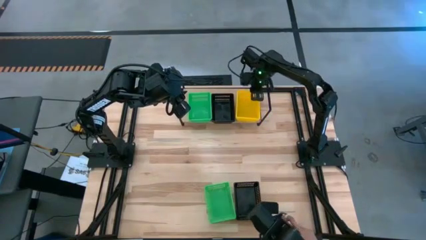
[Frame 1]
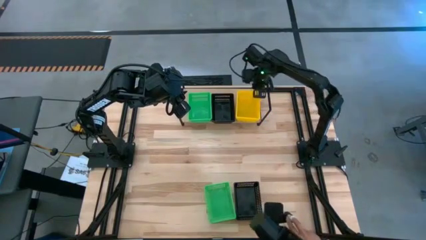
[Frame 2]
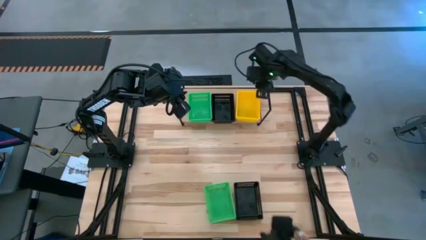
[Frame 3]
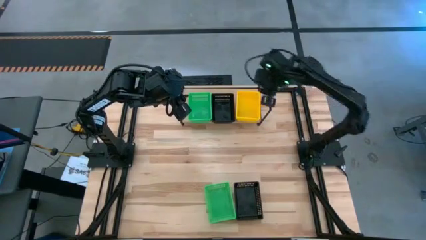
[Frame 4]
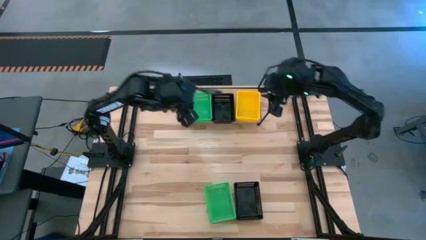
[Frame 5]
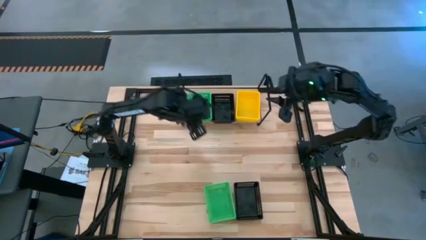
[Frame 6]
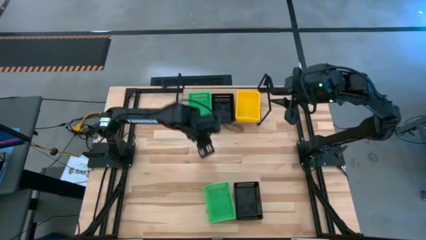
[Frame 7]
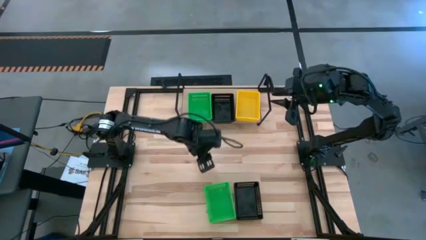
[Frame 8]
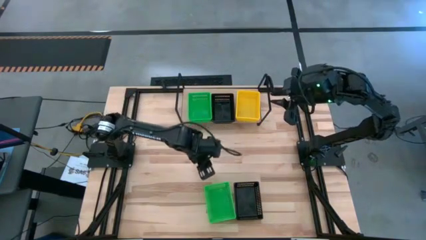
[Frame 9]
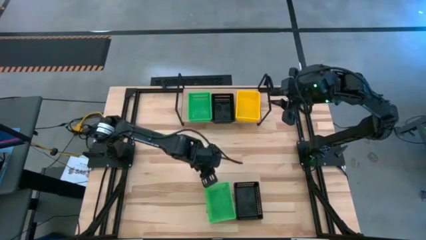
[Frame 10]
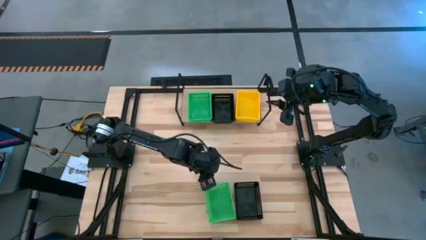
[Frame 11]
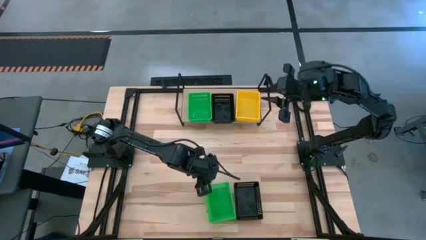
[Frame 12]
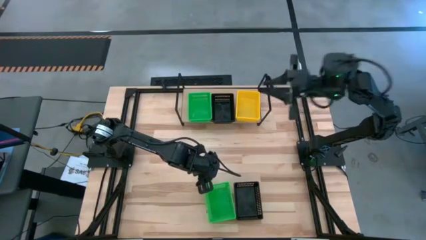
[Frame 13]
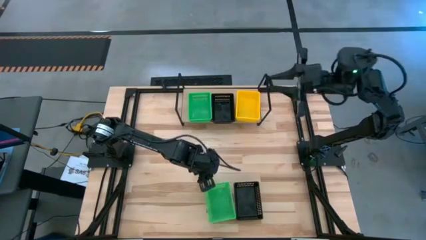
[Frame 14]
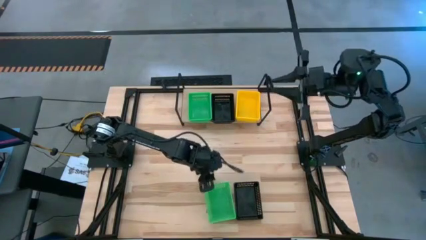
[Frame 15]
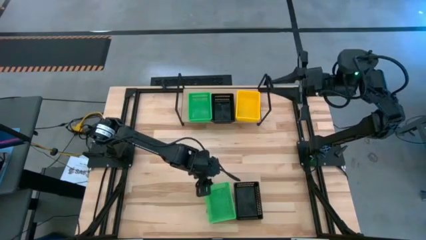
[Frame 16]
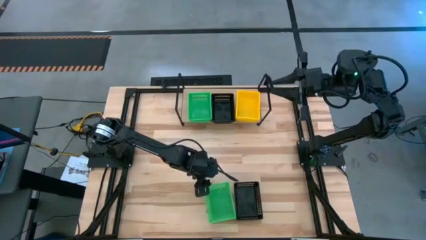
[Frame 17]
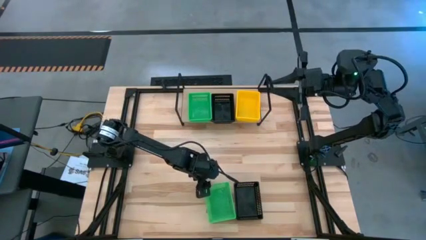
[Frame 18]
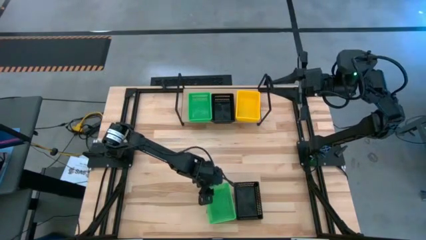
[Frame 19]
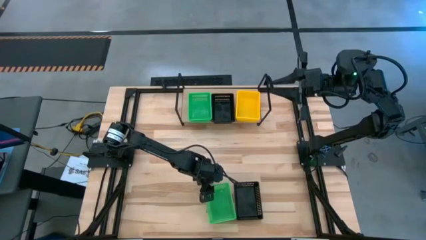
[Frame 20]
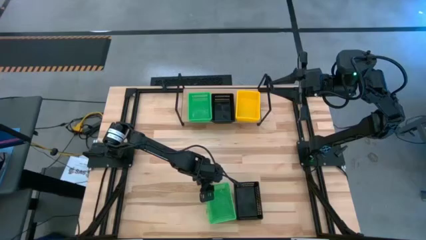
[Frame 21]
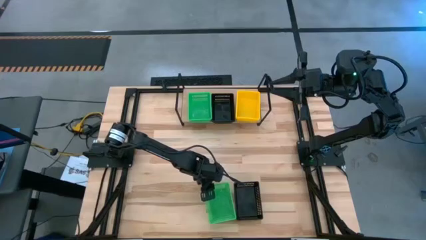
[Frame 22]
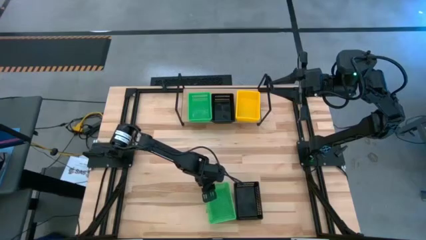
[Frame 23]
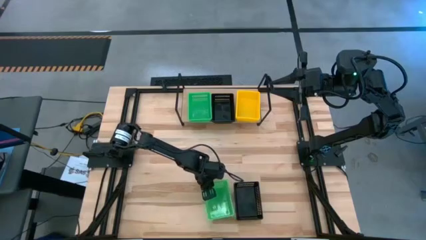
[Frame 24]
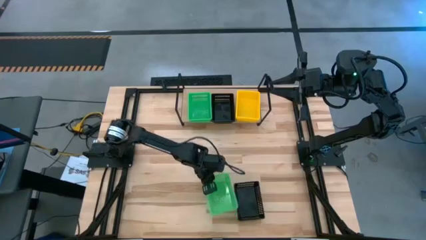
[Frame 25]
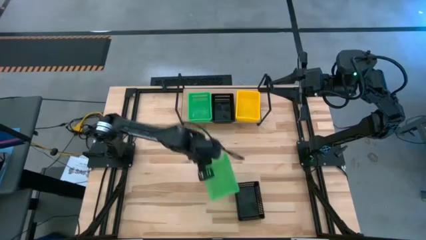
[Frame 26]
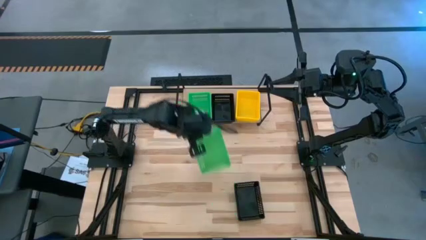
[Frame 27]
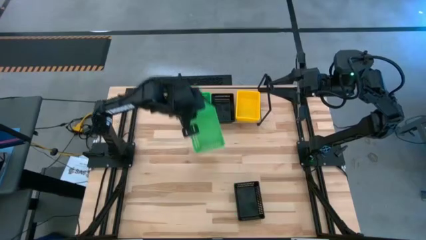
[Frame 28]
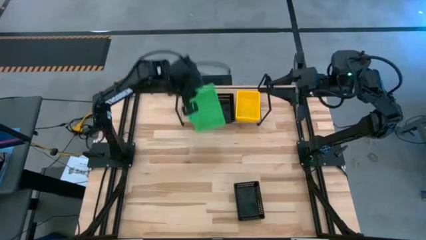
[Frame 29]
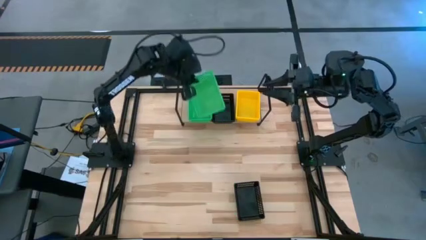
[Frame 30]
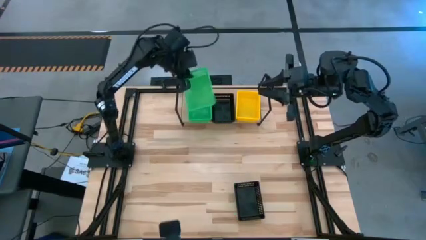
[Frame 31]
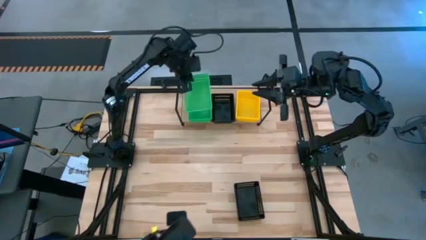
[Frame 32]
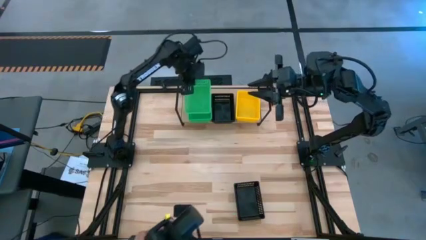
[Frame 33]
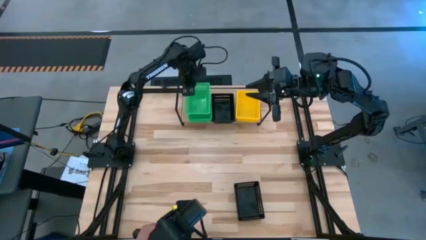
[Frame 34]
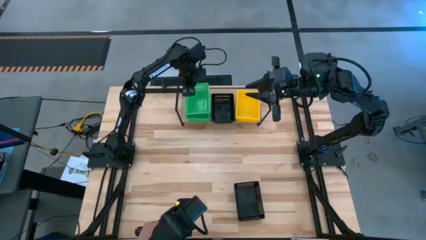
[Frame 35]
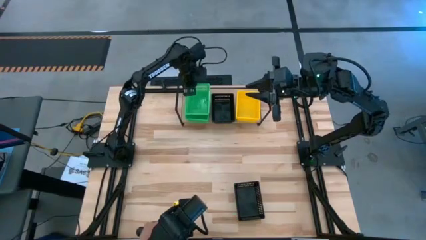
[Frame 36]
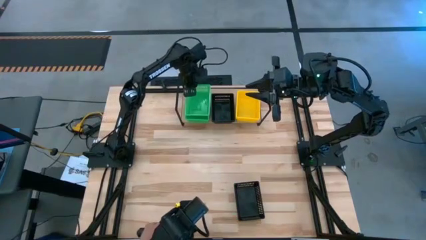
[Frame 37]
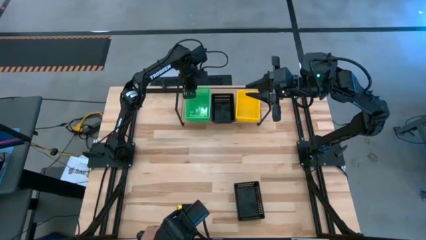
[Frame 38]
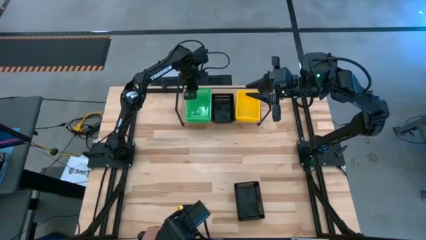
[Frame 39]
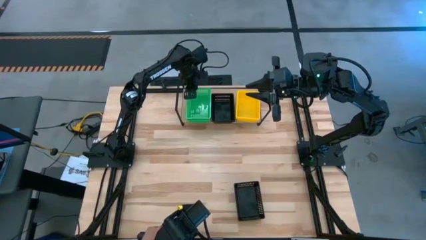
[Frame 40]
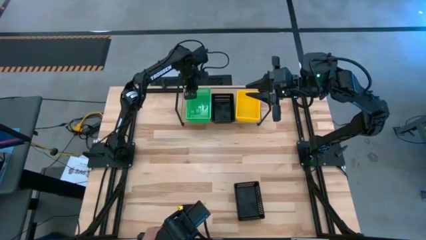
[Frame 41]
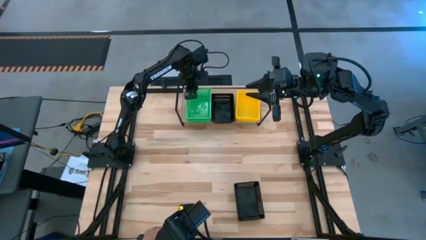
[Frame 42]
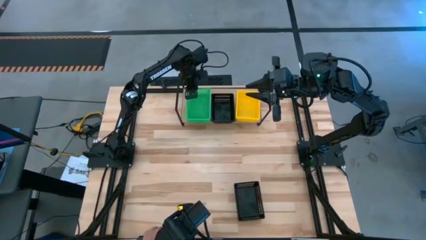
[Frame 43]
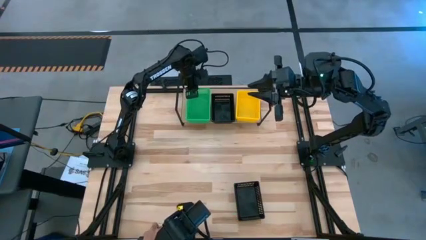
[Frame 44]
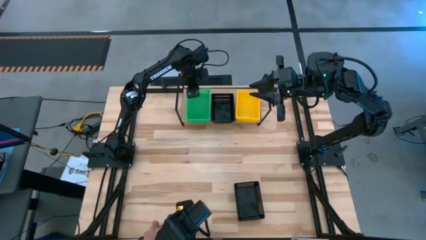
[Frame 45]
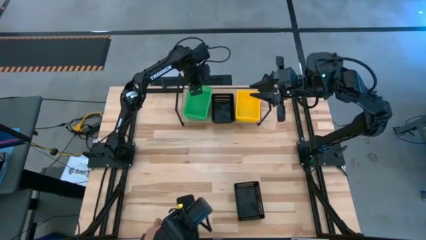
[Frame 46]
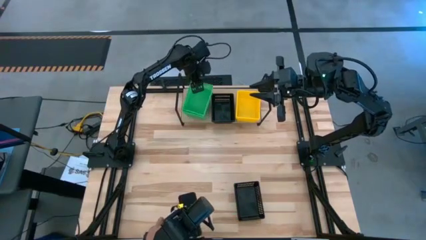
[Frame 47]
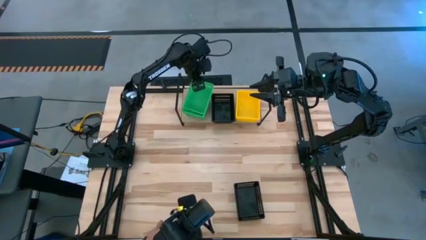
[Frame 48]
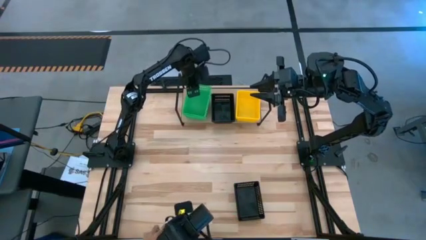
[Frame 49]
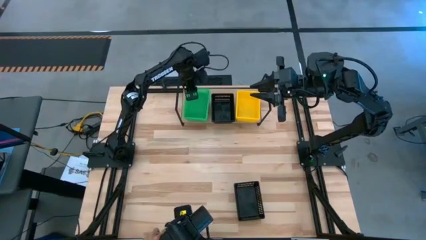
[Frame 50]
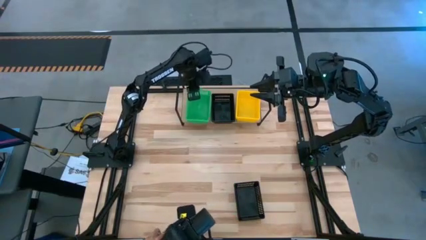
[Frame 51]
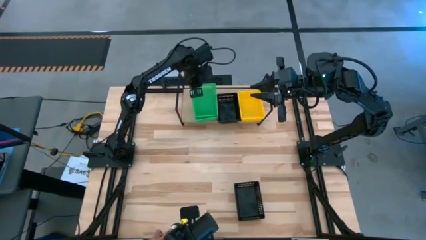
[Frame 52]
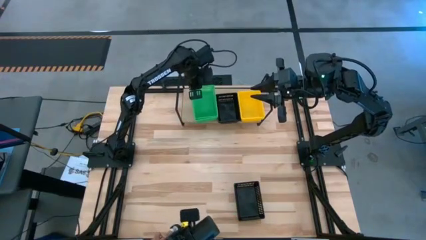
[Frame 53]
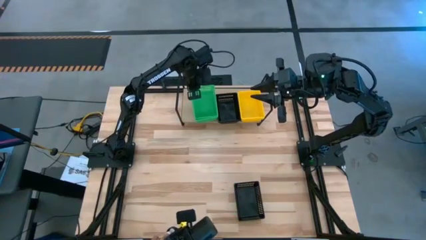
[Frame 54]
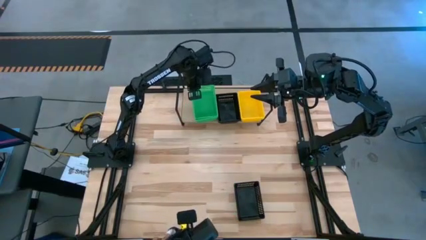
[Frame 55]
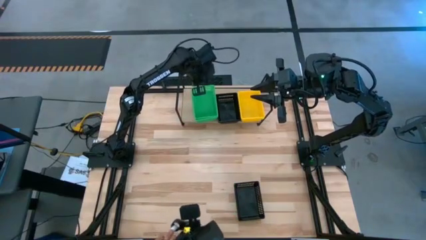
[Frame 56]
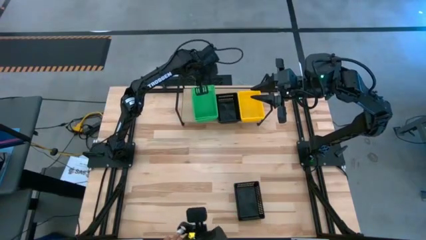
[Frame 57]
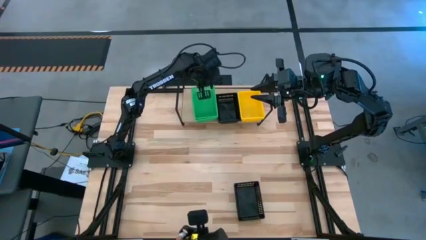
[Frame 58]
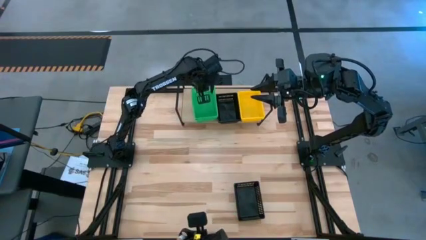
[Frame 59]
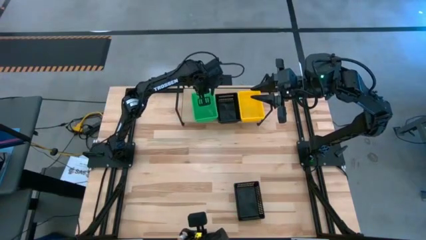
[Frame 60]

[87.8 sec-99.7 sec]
Task: Stack baskets on shelf by color
Stack the green bin on top of the green bin

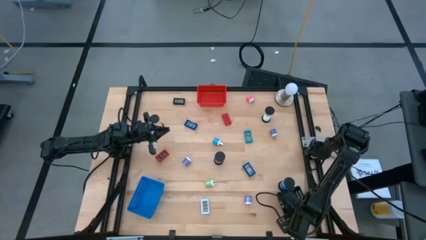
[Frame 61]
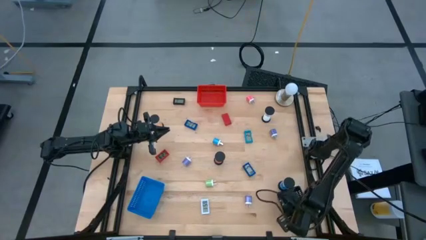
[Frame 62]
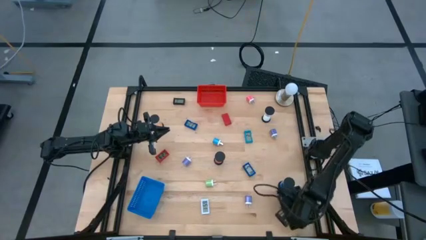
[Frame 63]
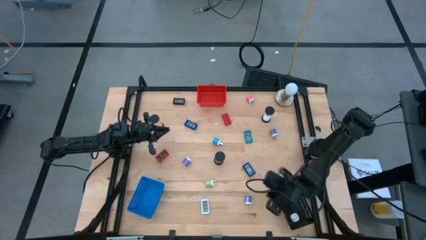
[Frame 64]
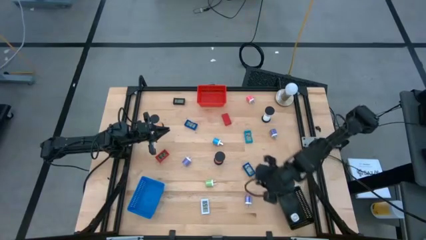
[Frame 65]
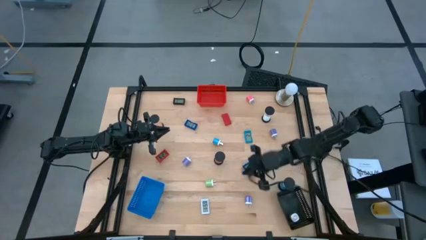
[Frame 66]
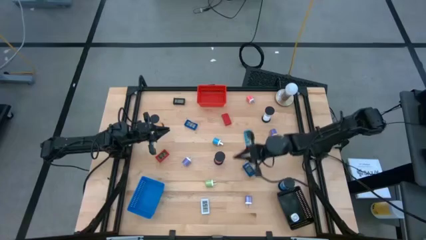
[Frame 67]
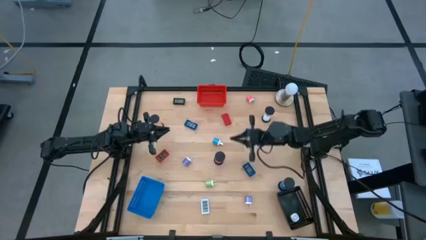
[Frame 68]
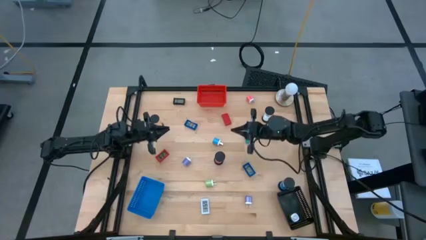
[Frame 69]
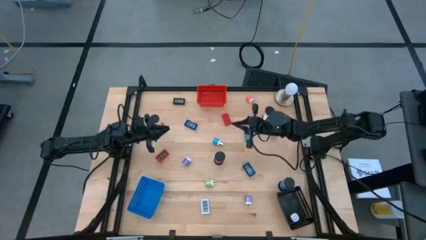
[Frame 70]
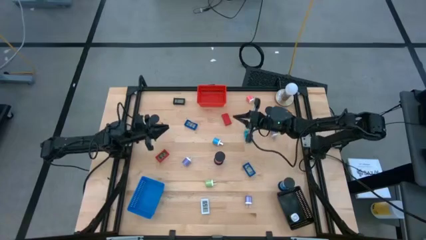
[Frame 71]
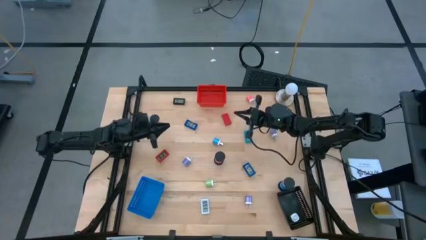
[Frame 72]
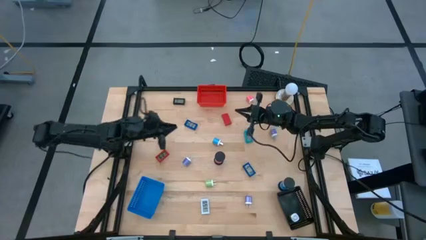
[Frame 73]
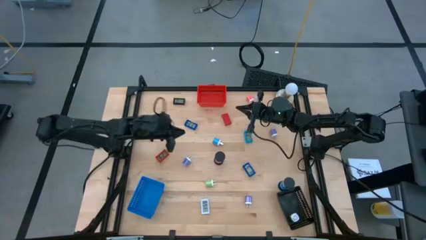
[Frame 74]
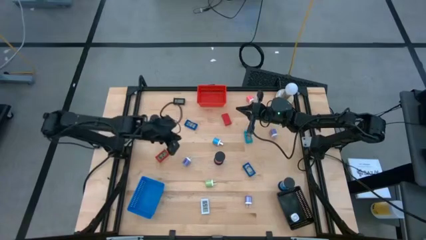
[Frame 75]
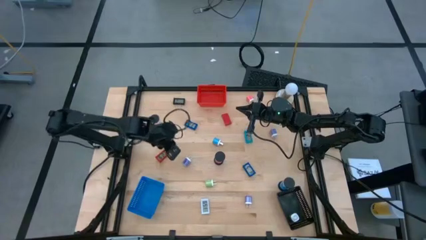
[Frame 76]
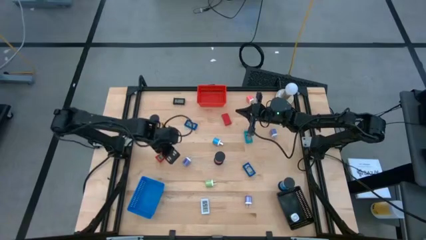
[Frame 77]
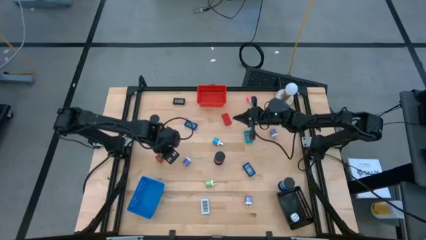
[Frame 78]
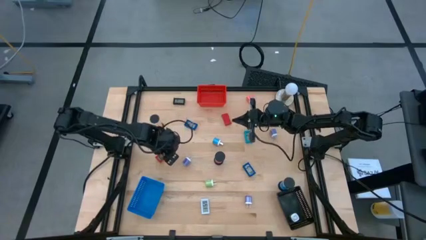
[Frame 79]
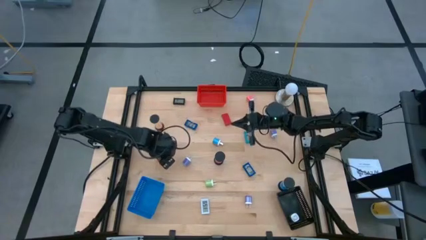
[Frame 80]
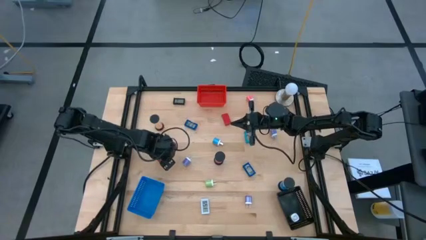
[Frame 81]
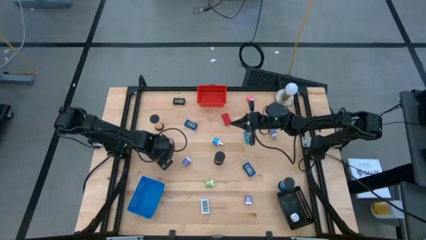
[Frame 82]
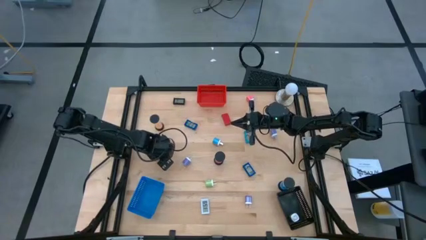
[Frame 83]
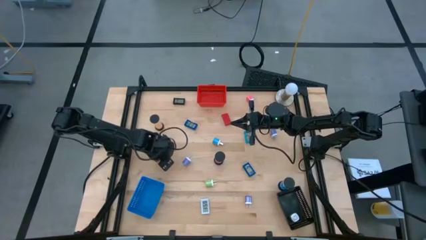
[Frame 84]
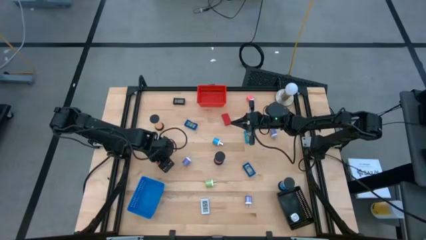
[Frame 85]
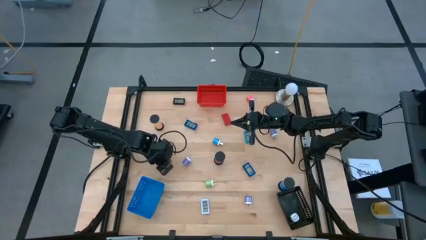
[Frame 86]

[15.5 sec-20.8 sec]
Task: Pick & Place Office items
Put the bottom red digital timer into the blue bin
